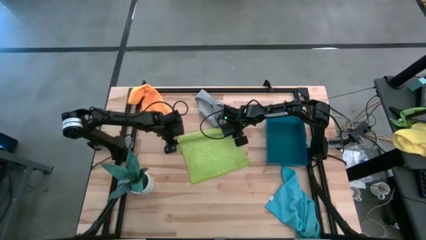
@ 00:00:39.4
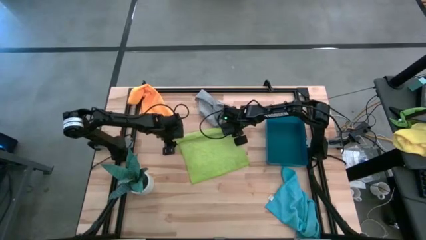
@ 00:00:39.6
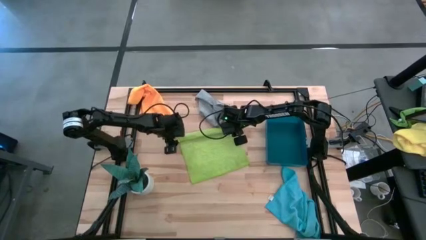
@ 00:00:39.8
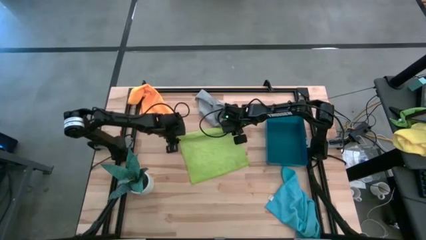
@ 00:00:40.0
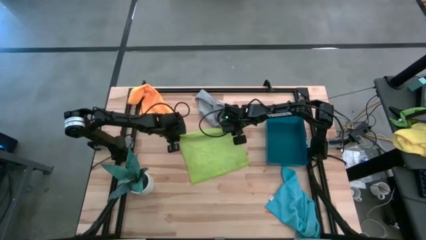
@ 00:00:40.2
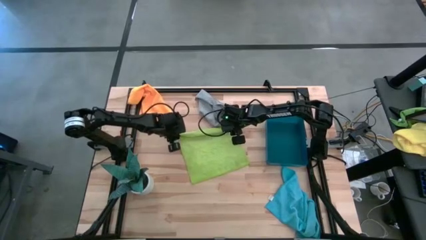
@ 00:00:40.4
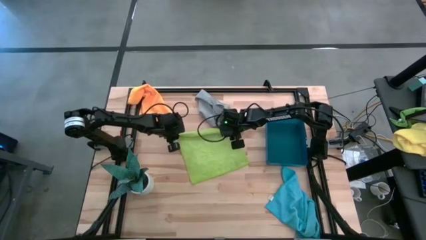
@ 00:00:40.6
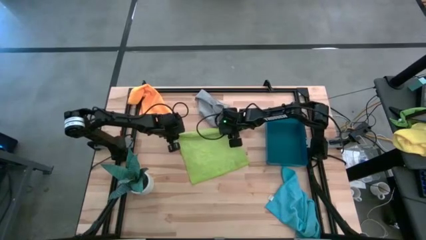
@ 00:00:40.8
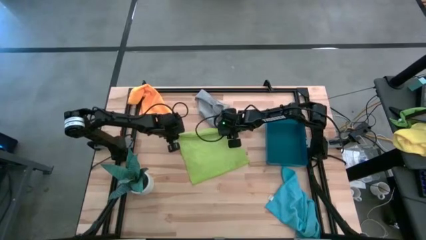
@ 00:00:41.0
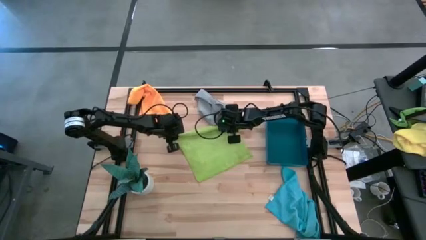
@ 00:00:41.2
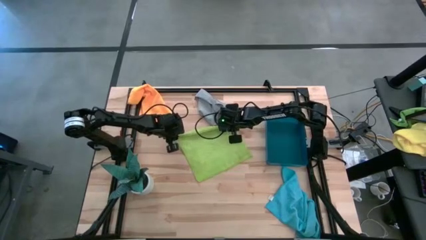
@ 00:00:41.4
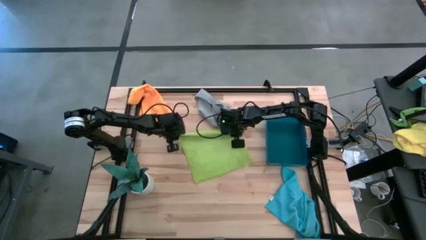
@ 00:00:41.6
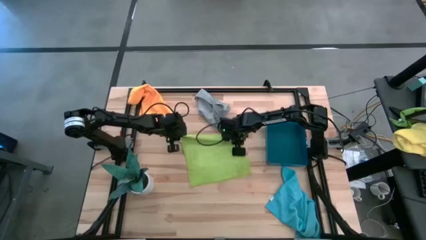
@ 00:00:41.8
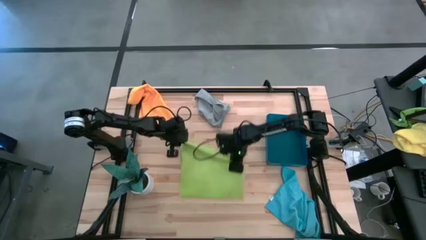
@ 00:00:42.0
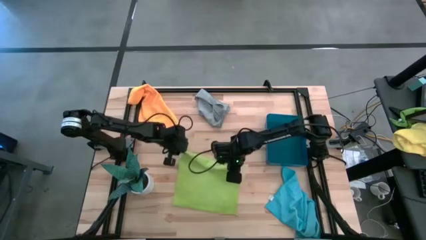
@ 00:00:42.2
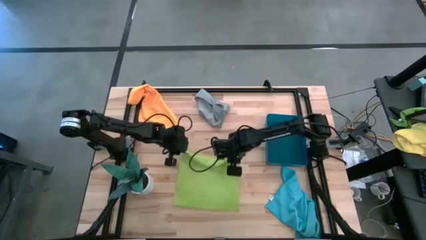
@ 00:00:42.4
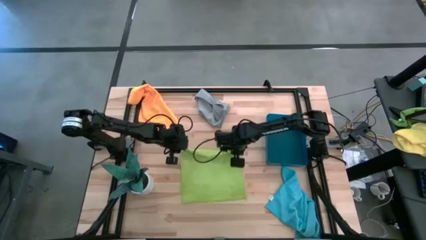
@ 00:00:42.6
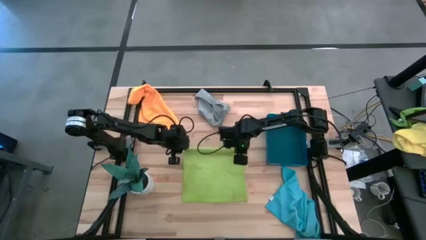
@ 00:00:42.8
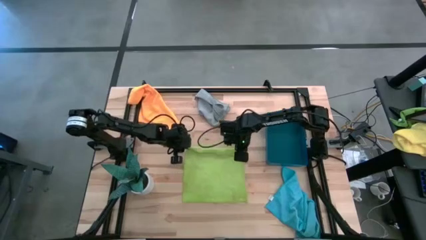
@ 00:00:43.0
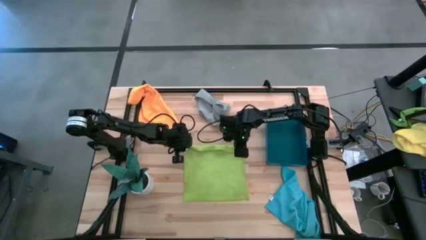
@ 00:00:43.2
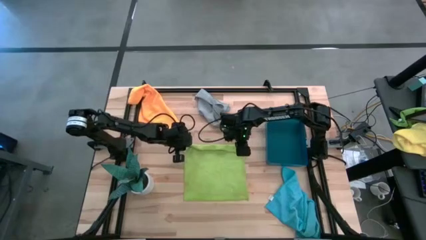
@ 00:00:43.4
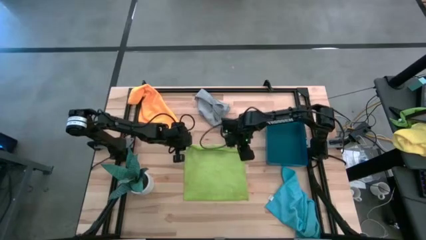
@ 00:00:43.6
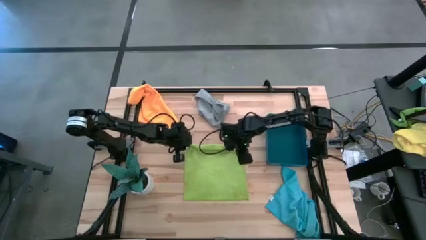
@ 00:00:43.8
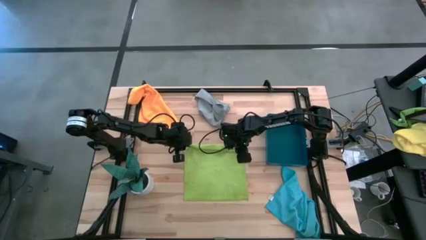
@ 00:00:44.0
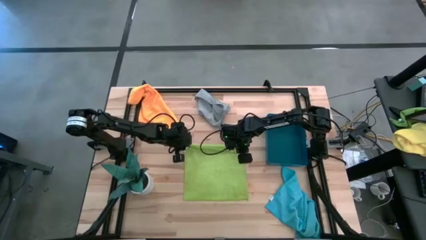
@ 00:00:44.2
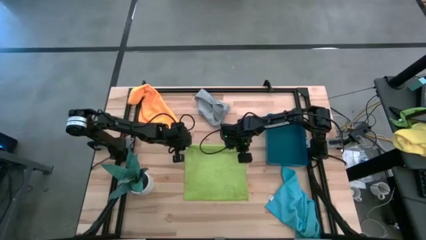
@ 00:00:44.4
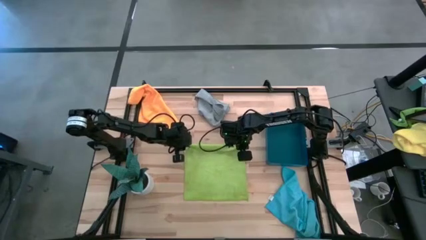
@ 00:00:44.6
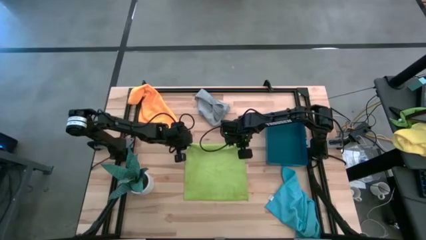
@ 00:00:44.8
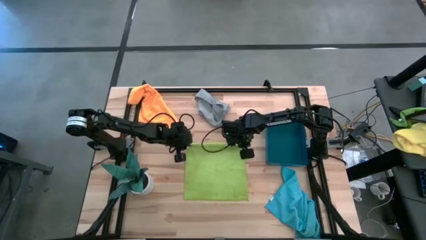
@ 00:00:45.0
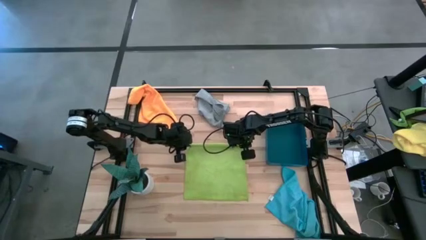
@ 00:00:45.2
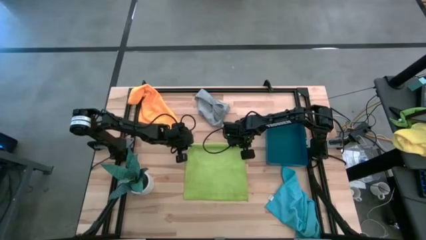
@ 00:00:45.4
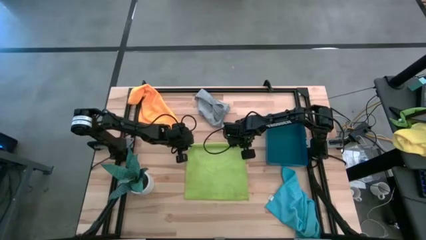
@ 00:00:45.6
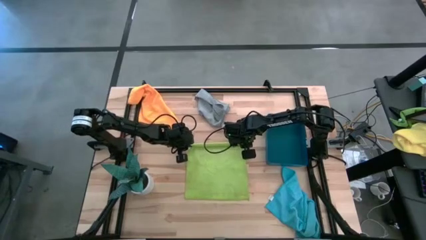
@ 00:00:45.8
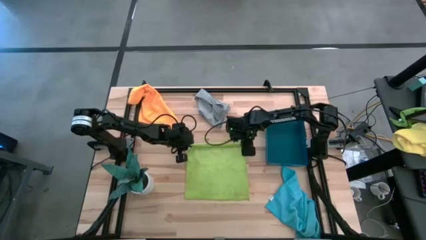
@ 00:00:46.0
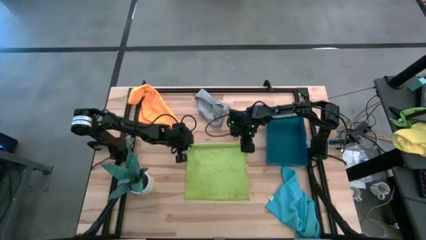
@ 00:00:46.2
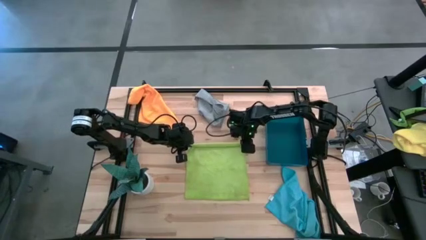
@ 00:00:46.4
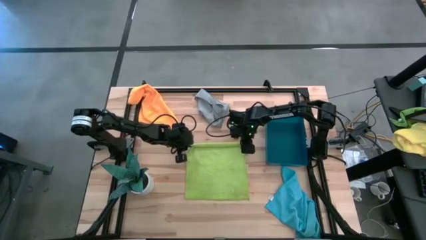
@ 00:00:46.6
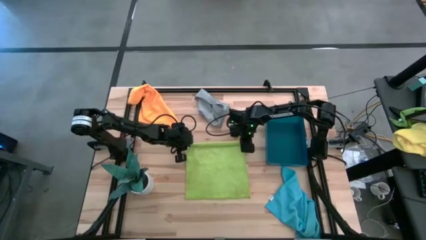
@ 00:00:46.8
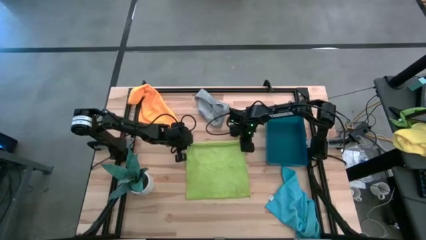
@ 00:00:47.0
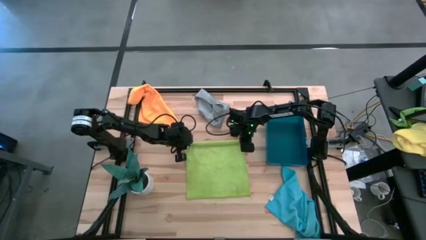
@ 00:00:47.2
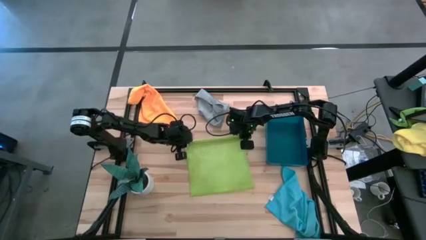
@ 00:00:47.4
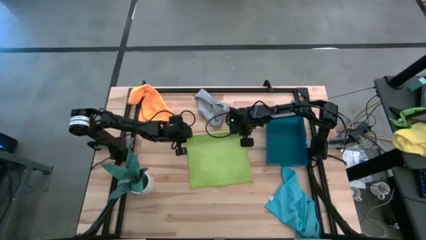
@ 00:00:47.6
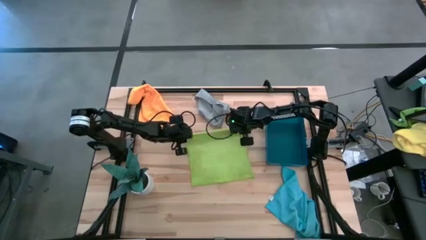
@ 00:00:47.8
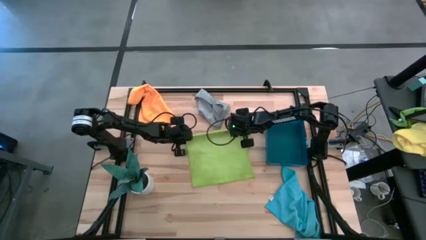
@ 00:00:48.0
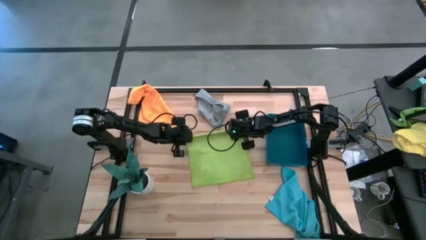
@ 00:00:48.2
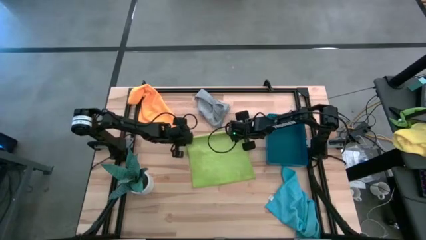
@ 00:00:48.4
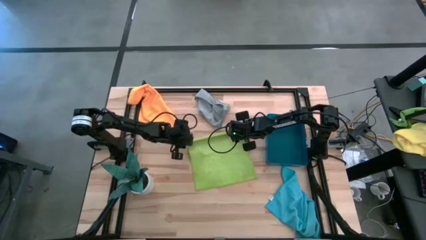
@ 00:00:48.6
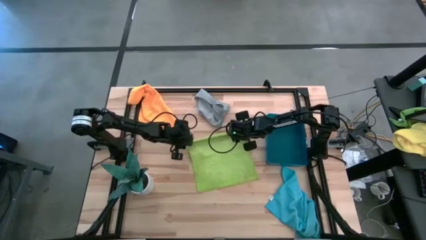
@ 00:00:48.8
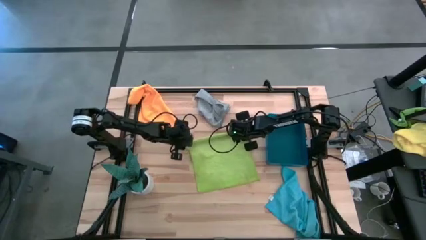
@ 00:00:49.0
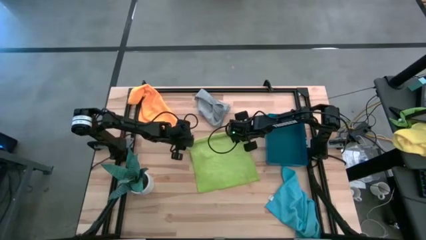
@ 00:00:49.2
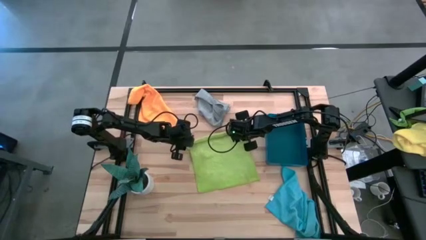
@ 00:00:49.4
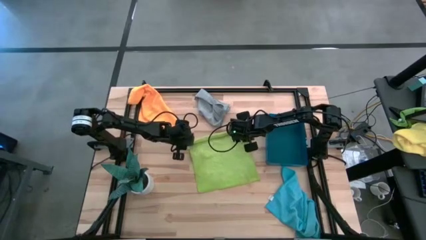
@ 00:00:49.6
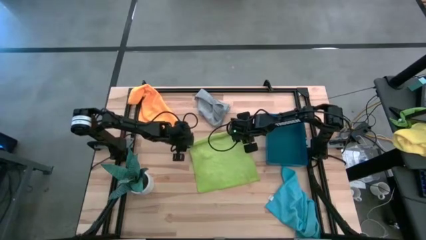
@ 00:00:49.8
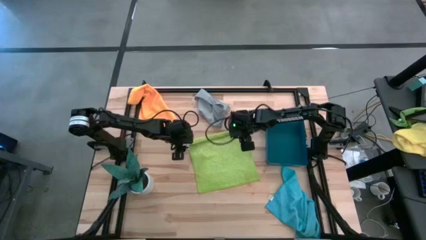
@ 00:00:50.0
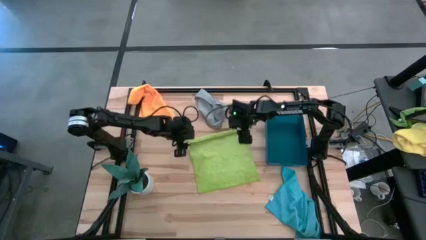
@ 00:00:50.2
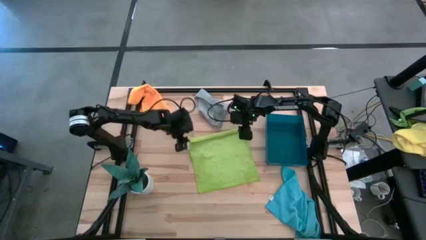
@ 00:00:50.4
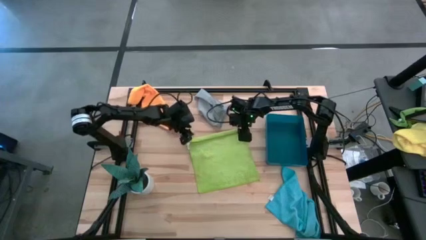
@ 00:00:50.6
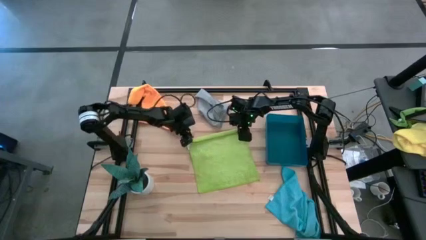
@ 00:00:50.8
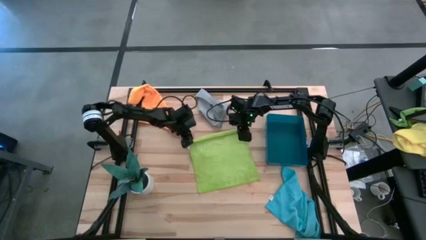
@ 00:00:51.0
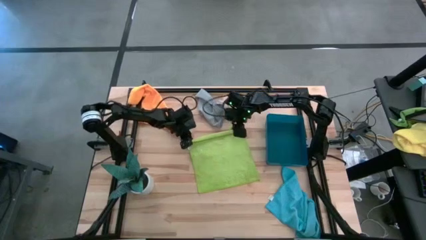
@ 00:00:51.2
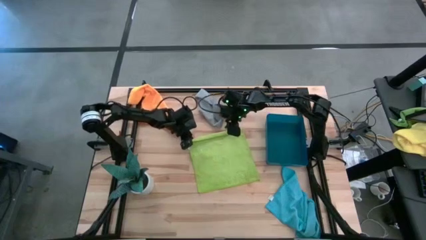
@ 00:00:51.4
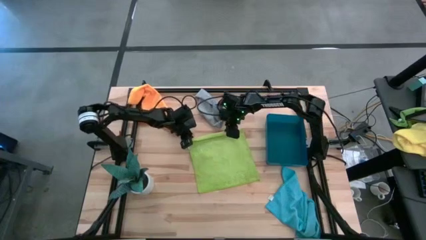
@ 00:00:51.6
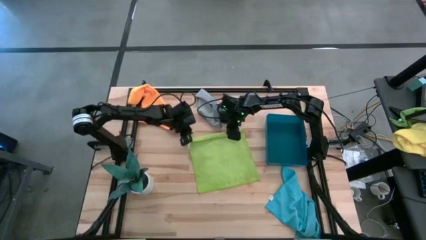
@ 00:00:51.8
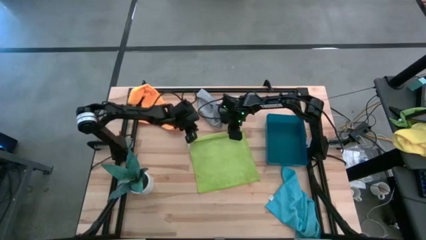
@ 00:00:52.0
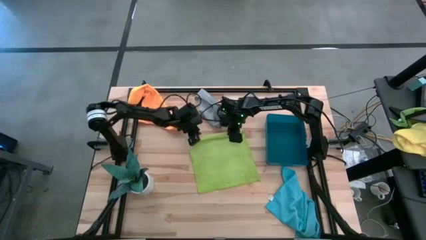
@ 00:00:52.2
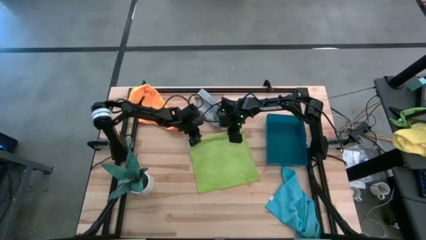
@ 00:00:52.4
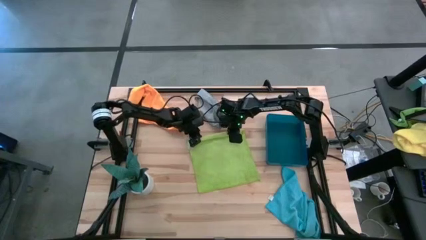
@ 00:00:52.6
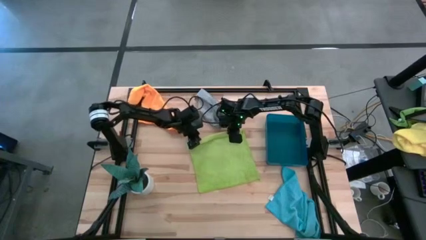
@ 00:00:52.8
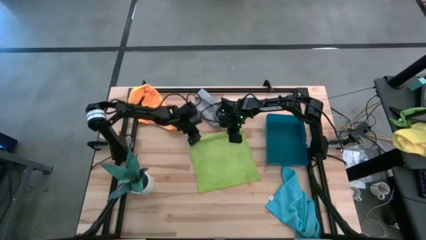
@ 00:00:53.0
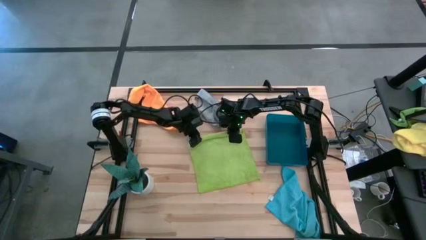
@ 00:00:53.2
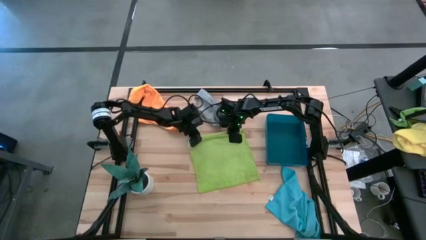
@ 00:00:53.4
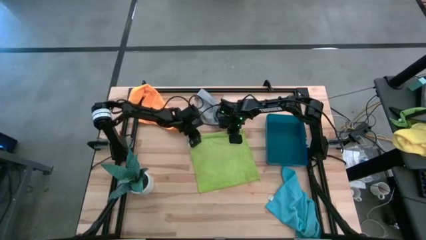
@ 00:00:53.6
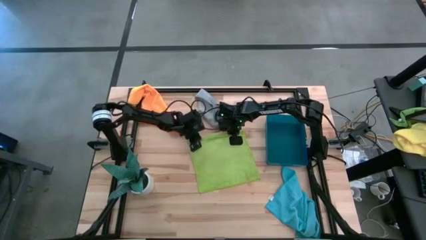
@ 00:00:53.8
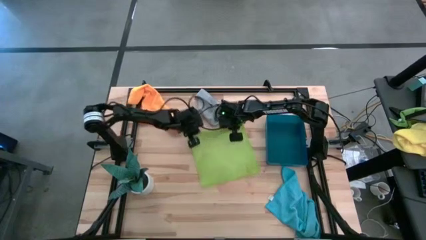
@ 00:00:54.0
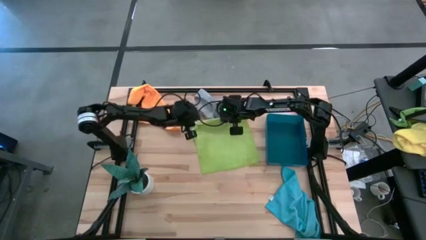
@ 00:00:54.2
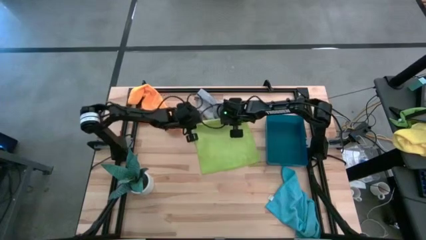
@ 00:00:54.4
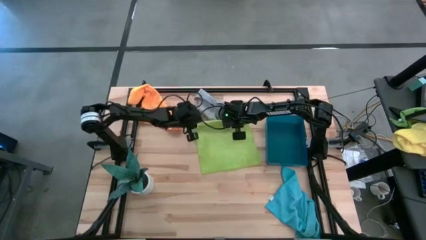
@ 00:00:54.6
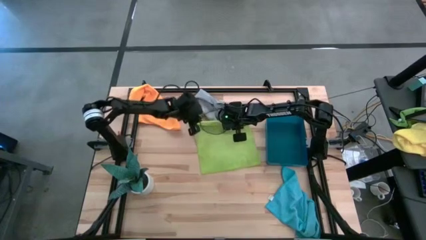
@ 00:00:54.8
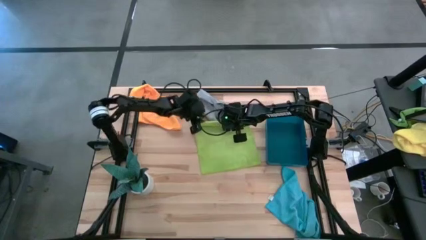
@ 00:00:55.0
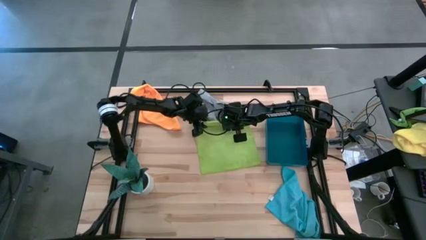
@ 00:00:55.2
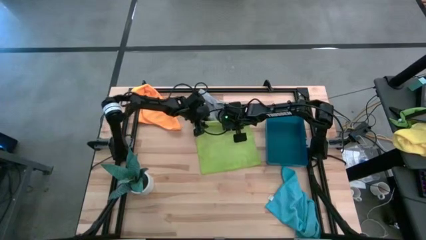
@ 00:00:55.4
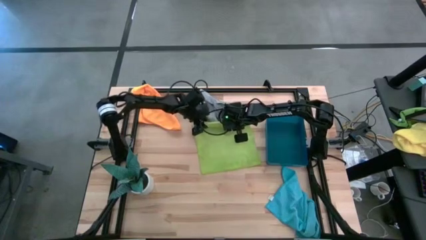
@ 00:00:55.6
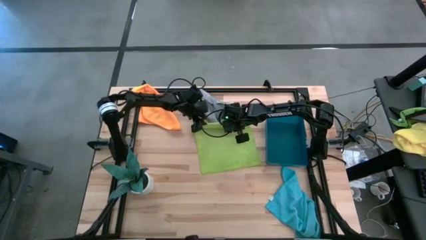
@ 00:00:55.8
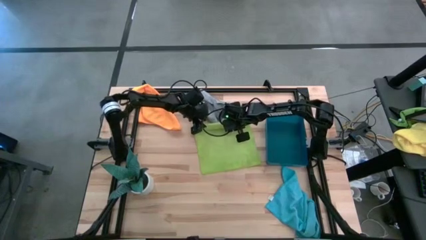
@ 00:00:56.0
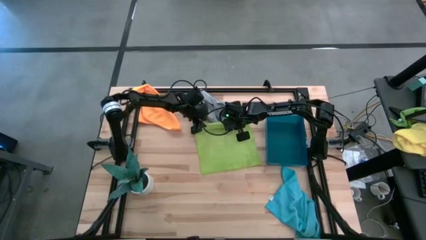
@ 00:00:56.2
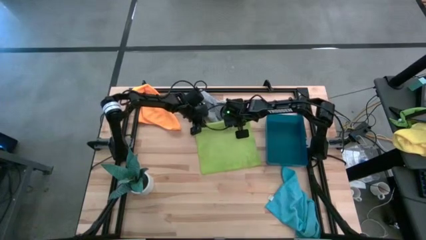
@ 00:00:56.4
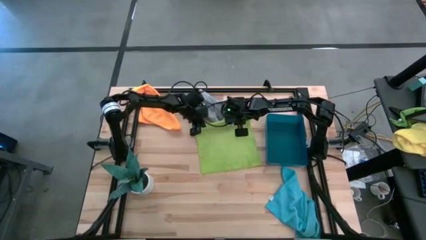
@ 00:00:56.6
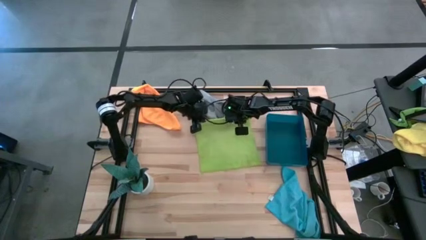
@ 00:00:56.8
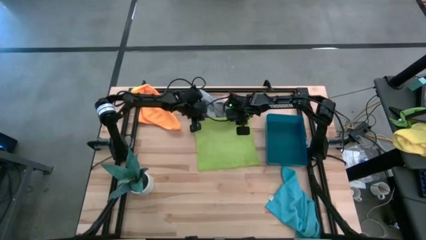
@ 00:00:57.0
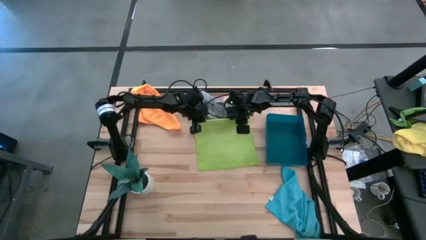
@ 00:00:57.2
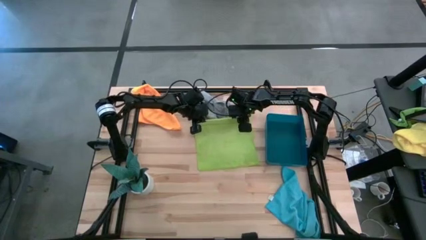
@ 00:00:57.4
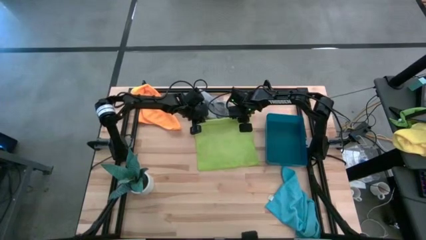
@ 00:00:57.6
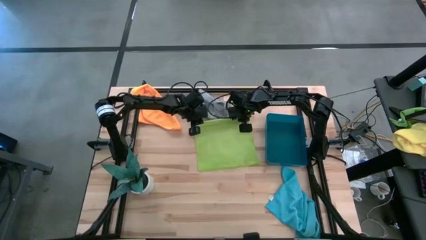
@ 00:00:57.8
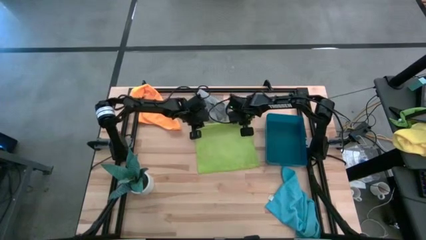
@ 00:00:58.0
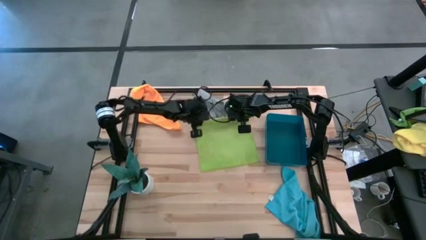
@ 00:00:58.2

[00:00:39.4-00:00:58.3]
Task: Roll microfiber towels into tight, uniform cylinder then place into a basket
Roll the green towel
